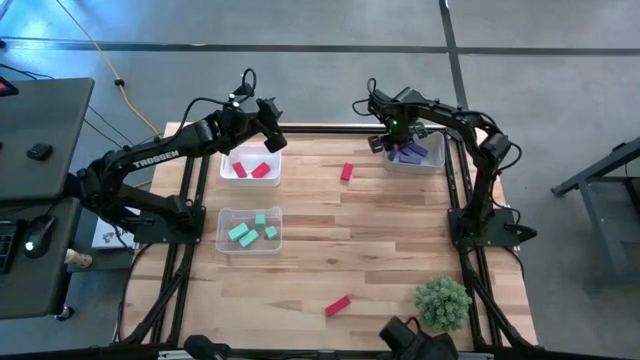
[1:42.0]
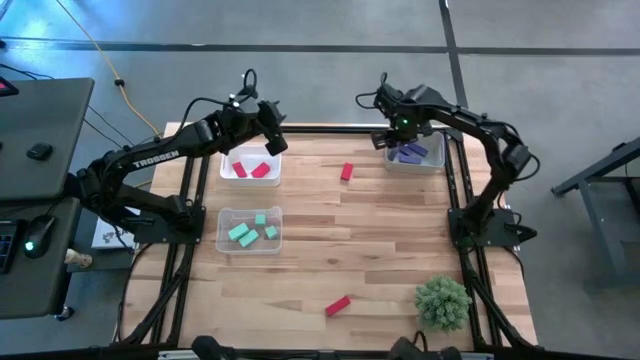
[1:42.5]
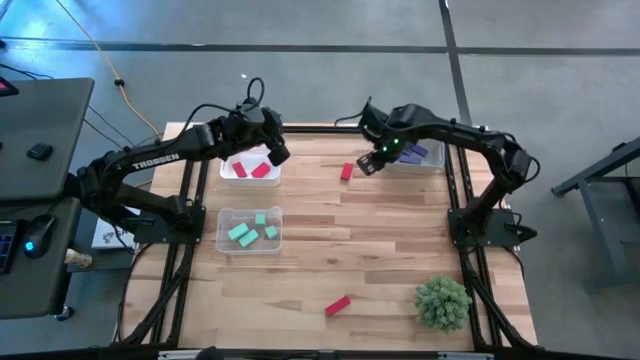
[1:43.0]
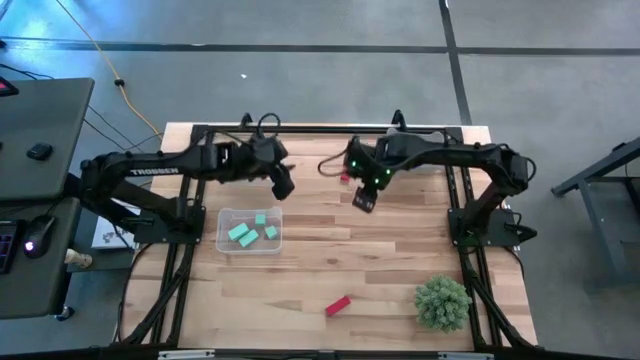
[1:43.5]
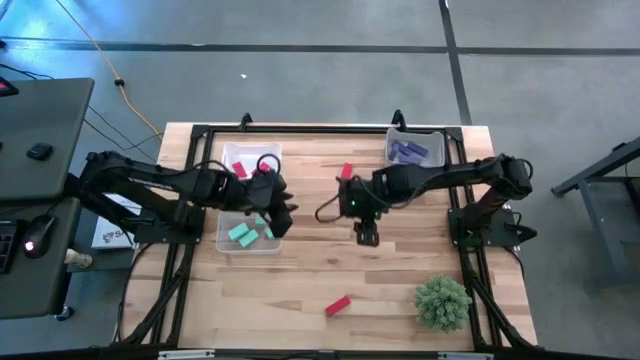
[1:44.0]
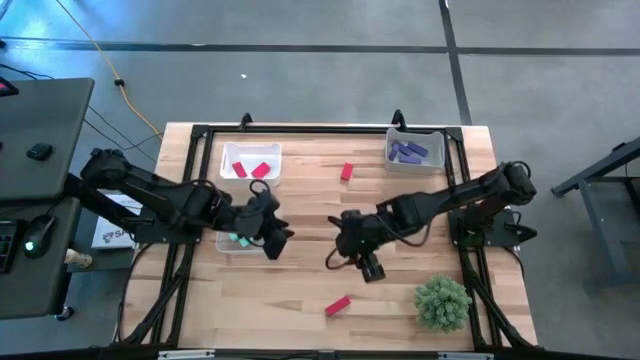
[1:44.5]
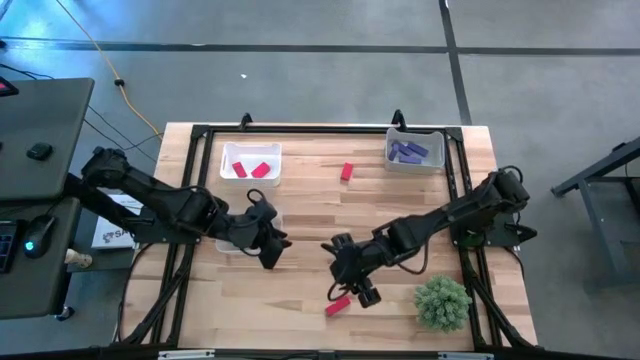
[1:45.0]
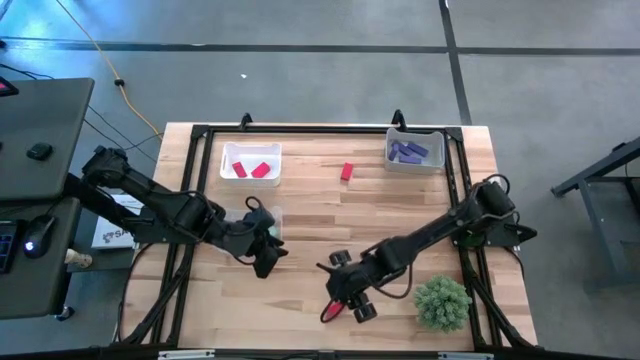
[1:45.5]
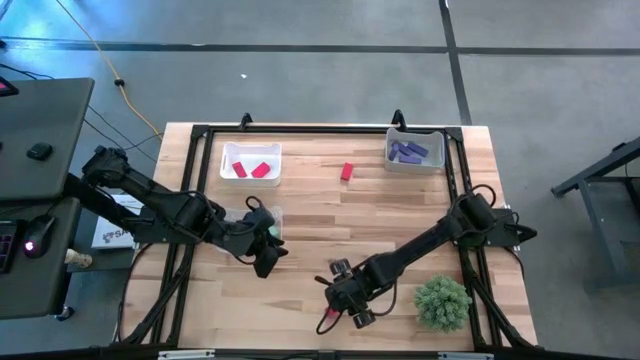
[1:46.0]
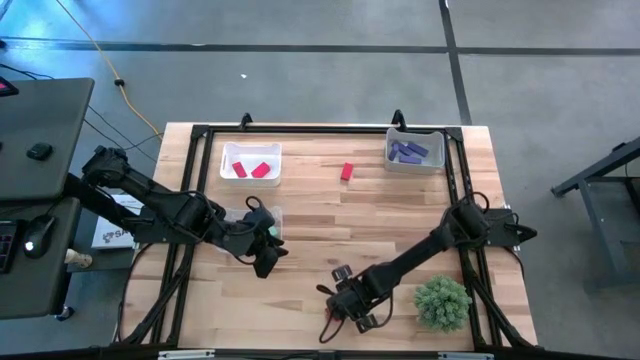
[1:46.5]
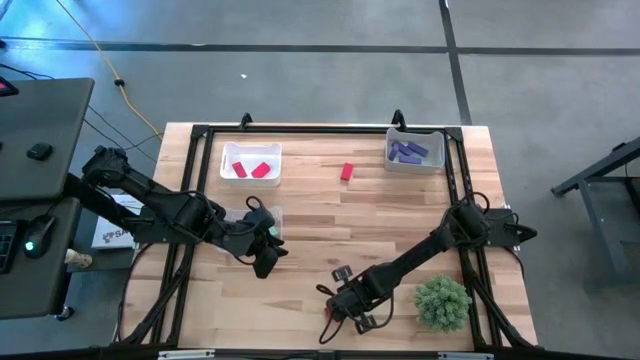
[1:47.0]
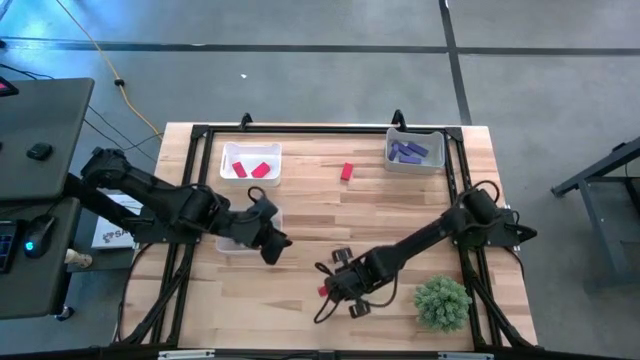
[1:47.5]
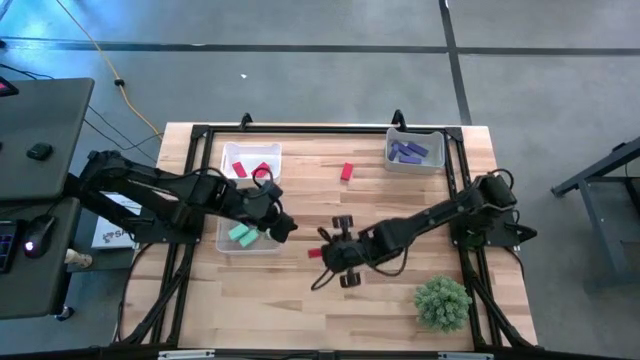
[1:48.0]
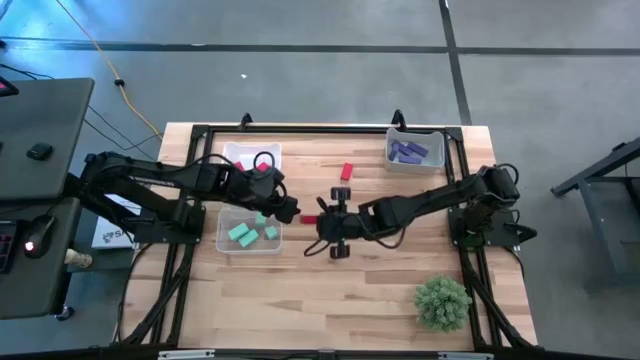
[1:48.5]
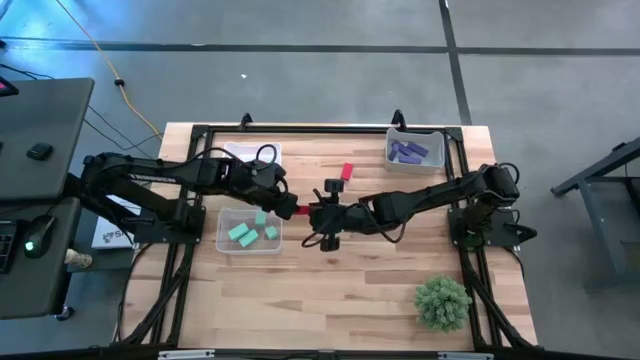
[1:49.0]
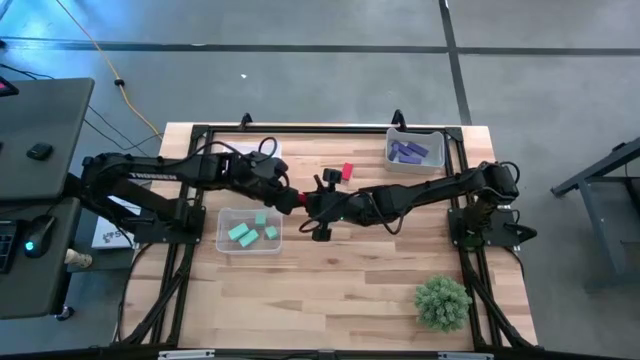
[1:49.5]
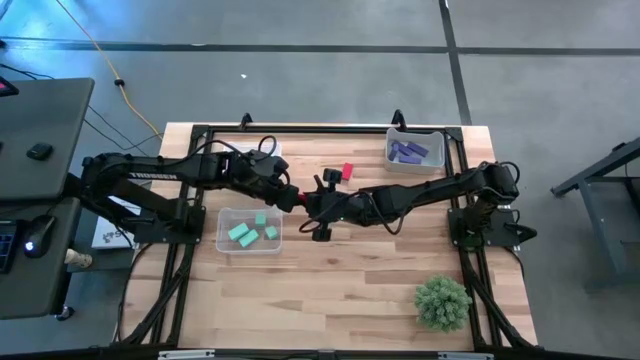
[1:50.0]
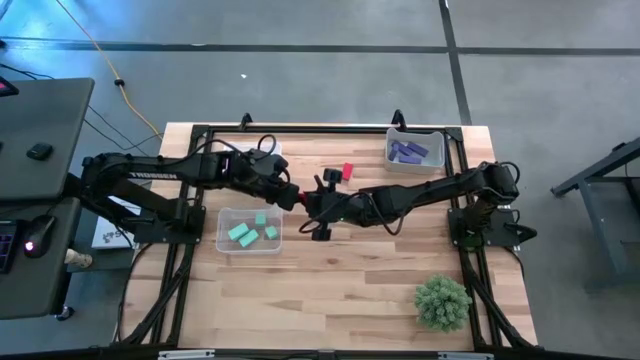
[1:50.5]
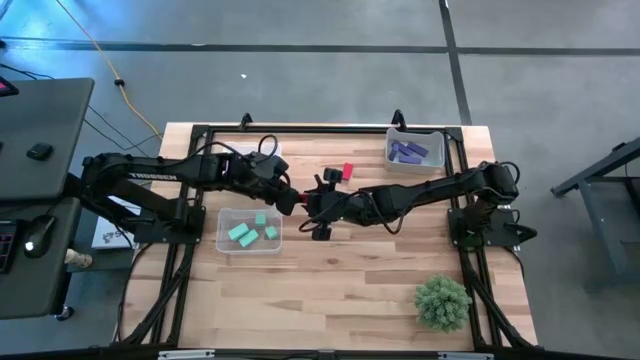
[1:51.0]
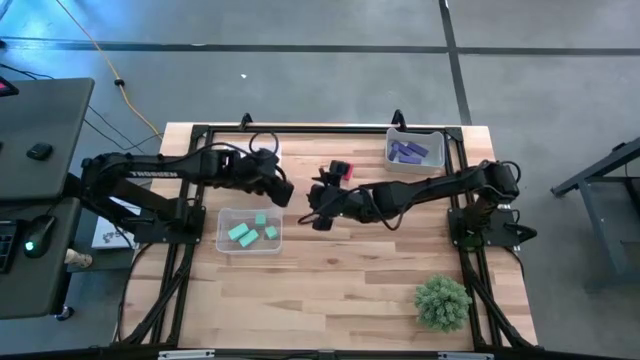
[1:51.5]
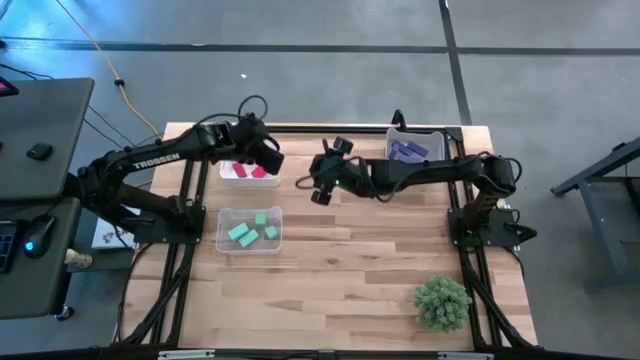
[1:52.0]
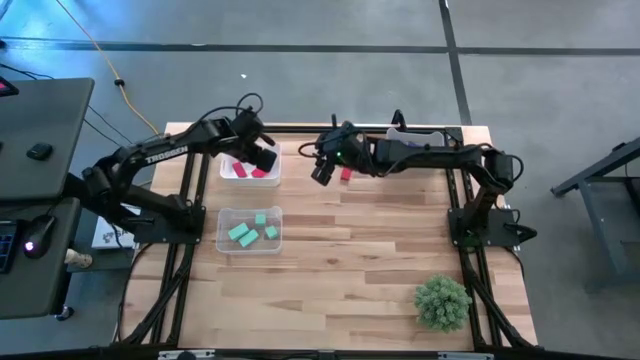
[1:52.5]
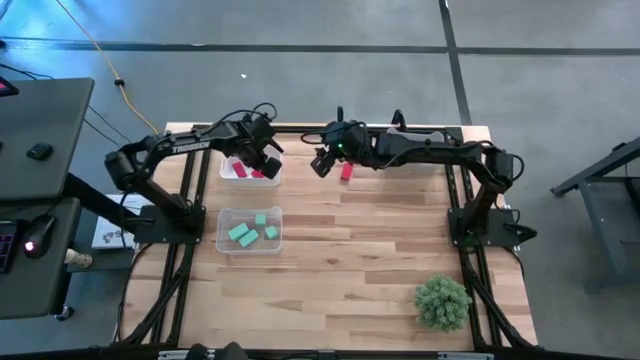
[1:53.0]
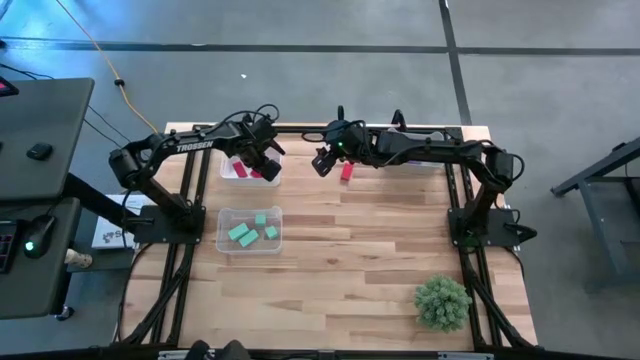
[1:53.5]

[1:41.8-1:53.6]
Task: Sort & place blocks by color
Put the red block into the white bin

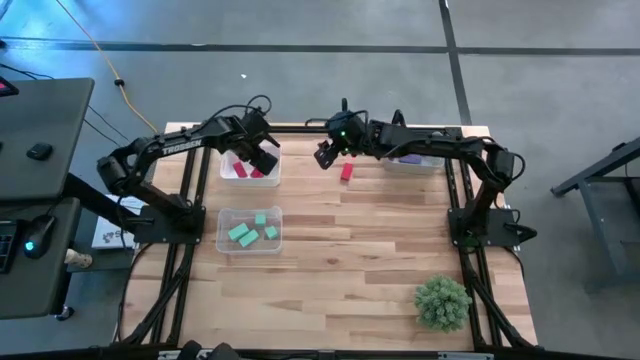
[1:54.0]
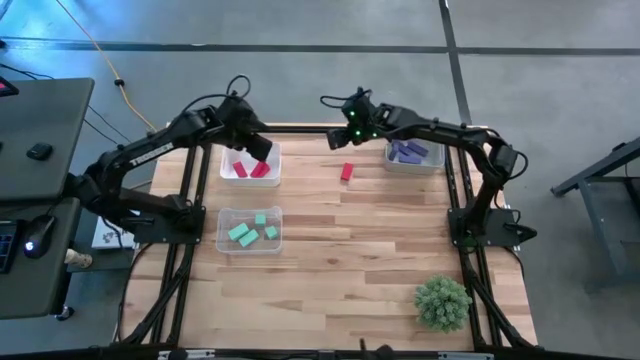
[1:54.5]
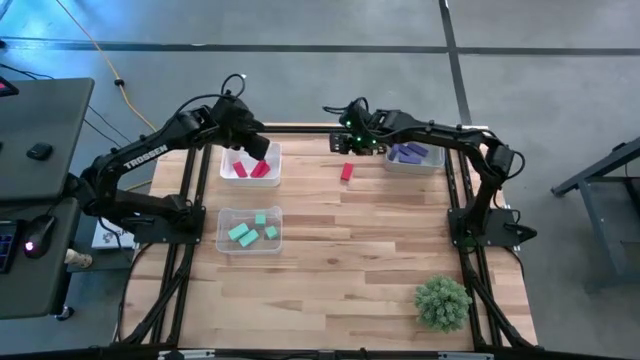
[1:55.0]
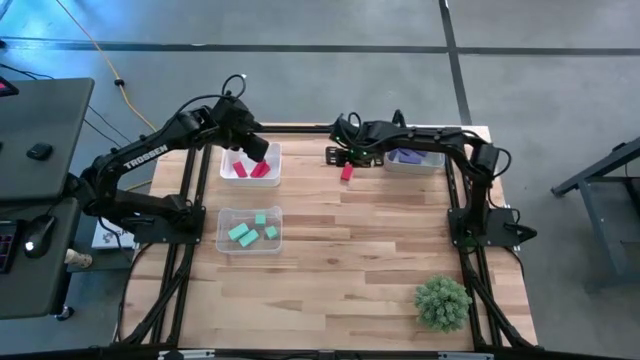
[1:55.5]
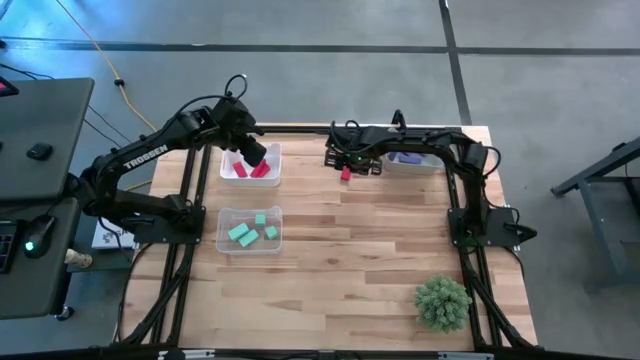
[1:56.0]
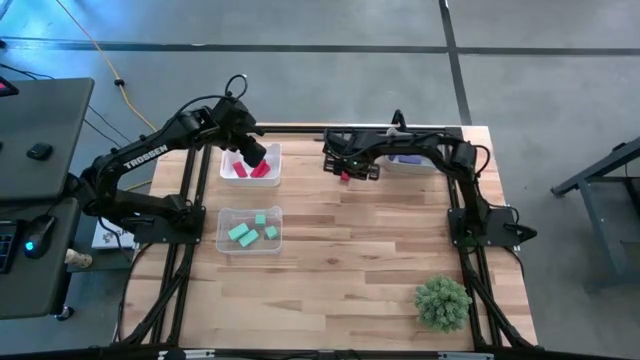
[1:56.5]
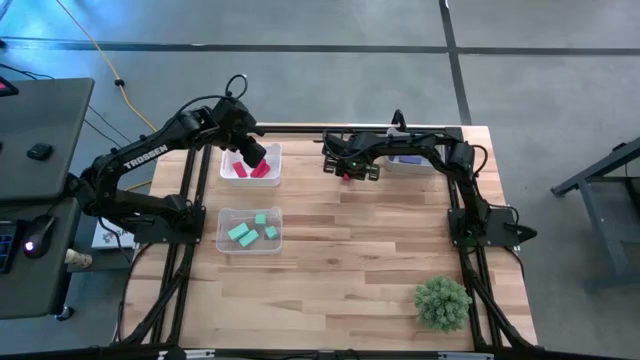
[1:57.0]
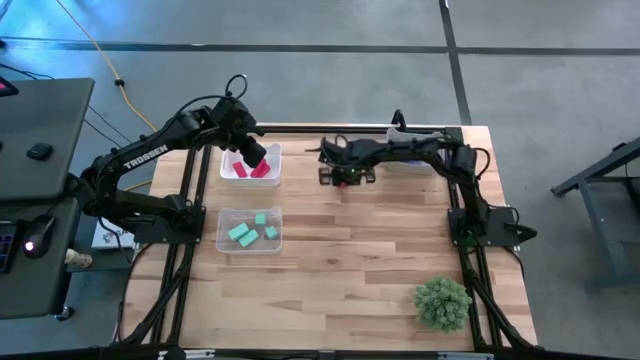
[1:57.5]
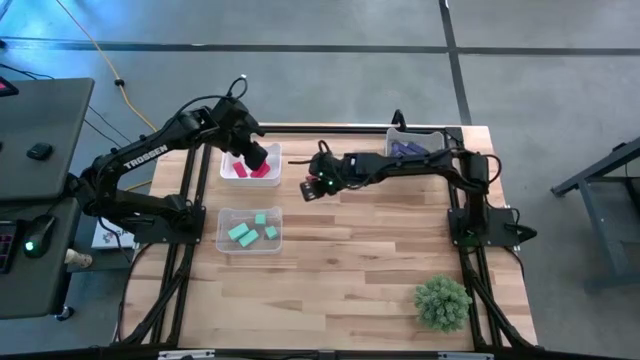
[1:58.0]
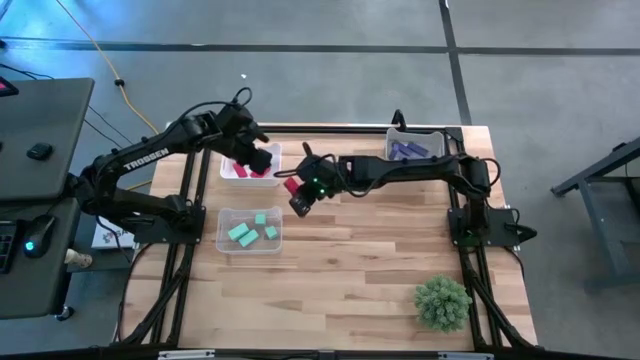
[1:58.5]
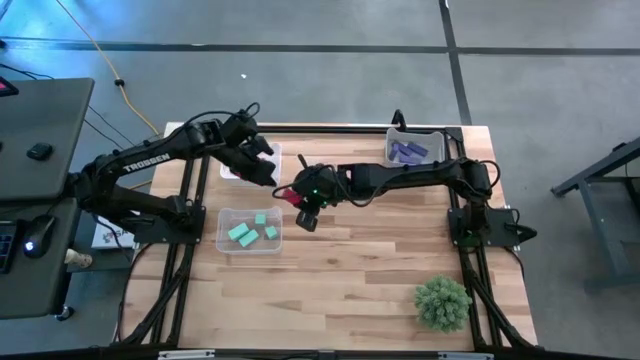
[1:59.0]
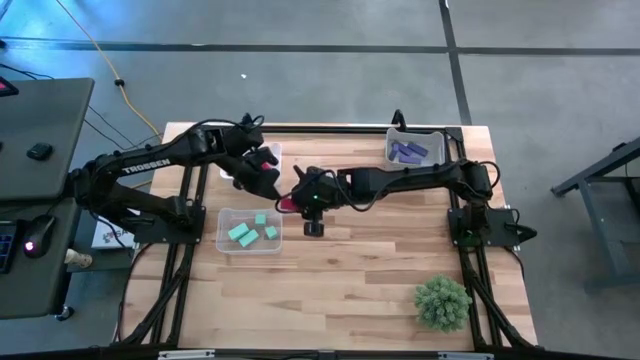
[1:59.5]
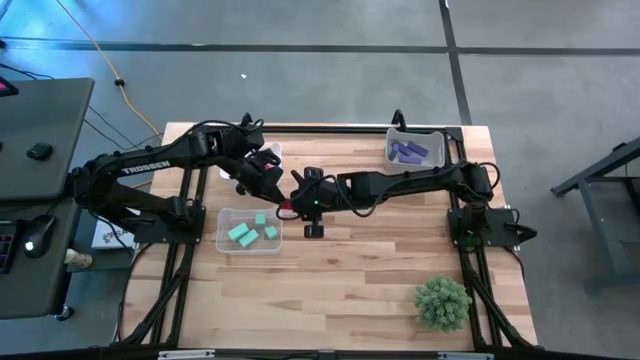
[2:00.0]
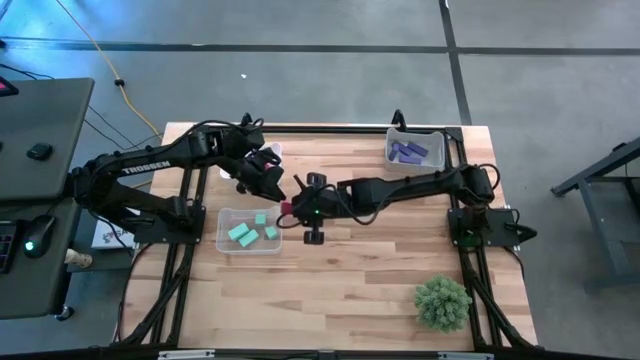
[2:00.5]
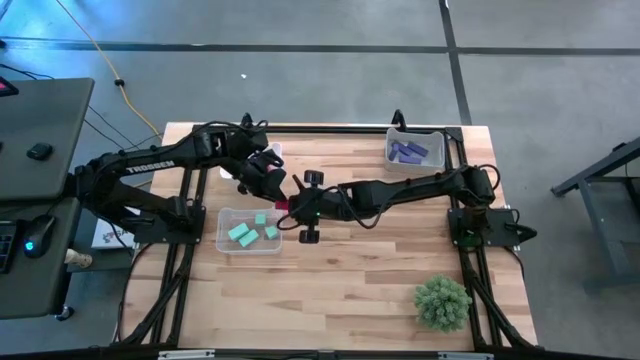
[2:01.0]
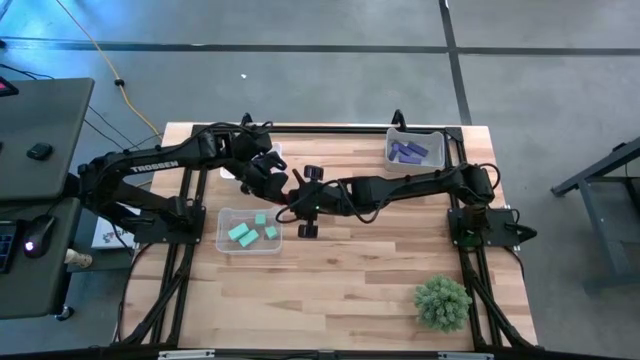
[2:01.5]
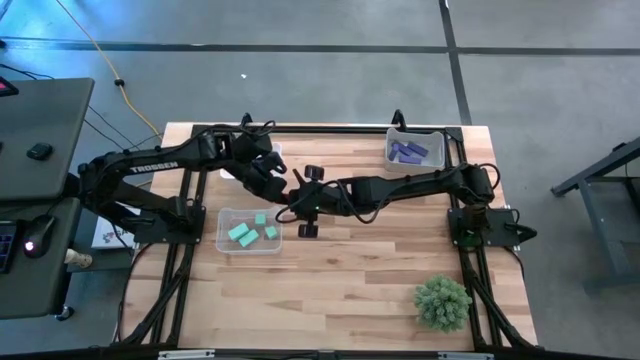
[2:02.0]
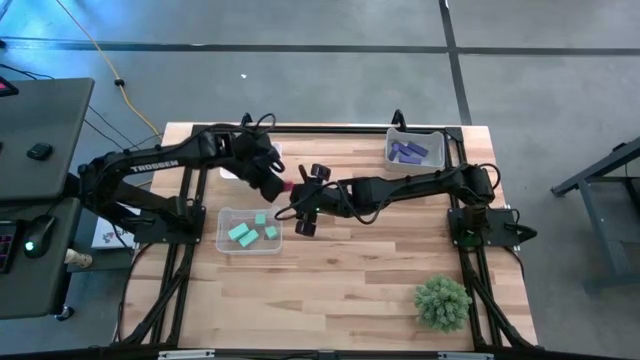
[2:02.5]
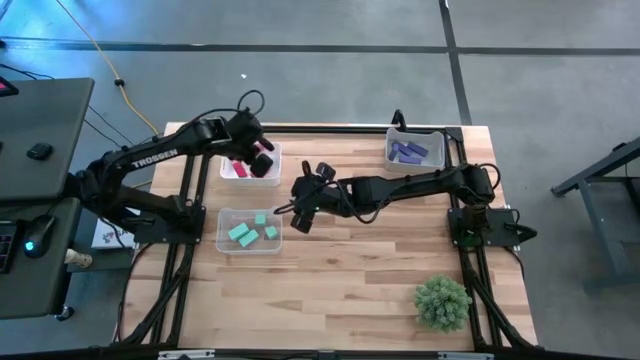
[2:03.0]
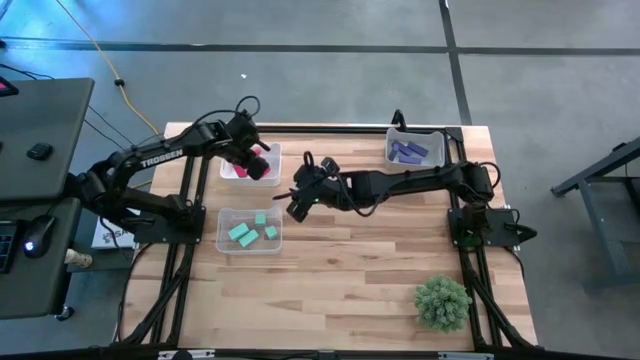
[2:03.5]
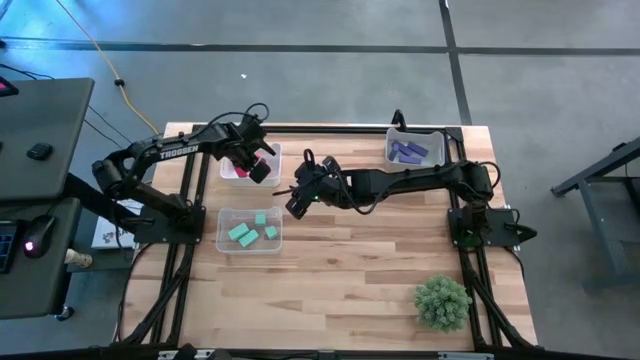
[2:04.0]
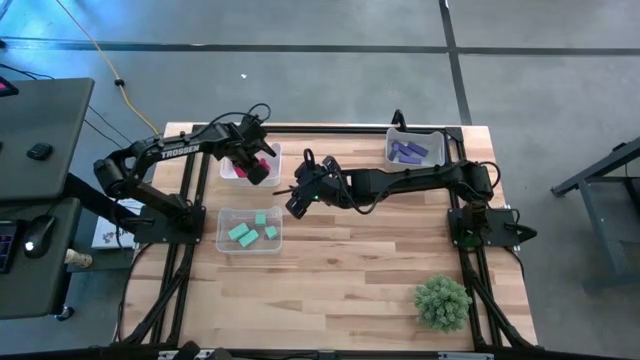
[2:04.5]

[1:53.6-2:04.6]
Put the red block into the white bin
